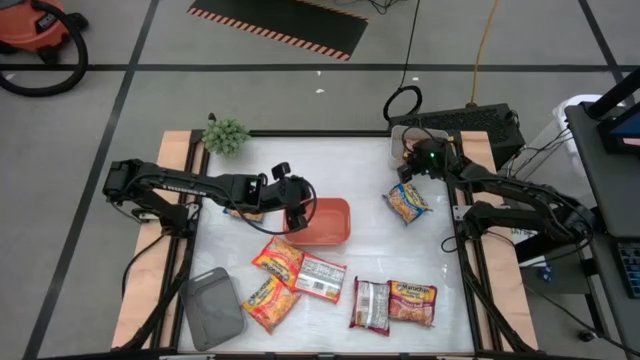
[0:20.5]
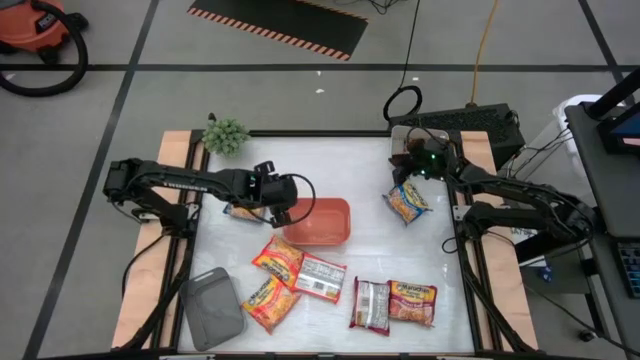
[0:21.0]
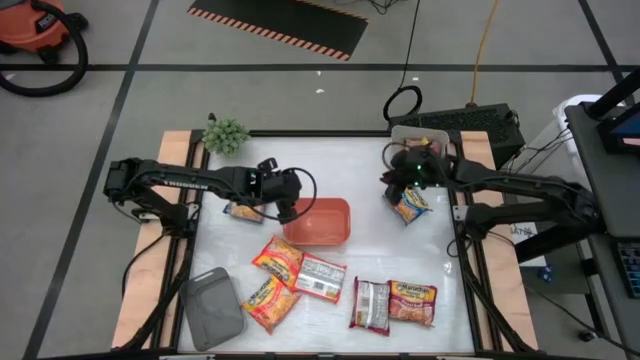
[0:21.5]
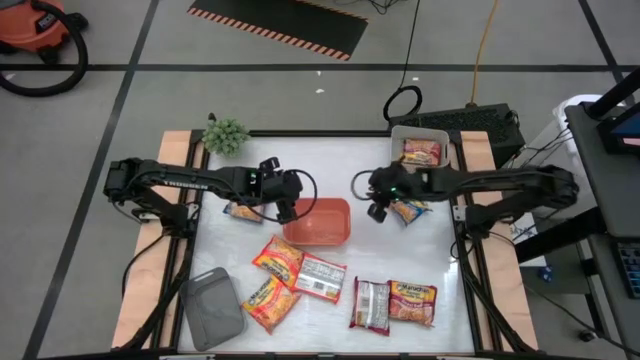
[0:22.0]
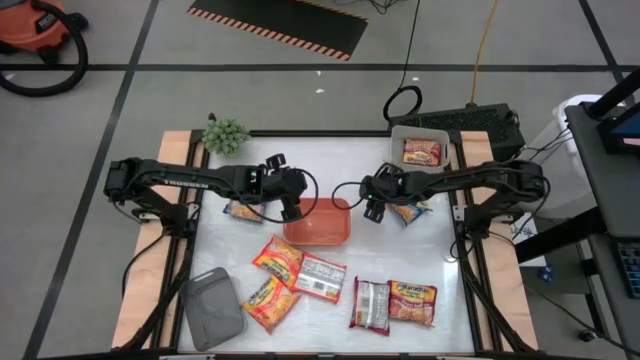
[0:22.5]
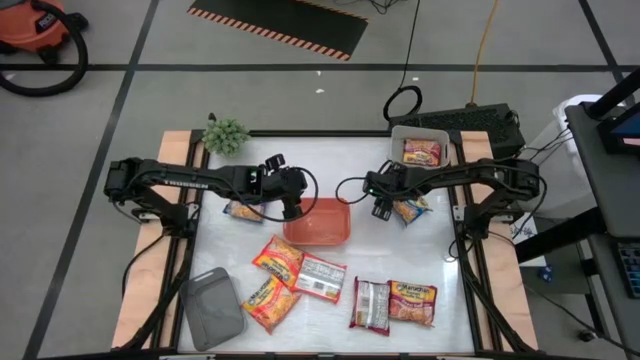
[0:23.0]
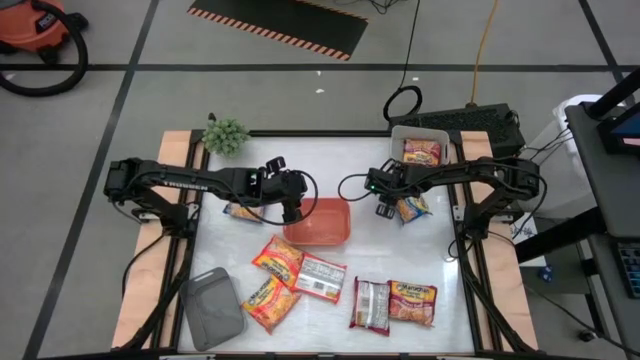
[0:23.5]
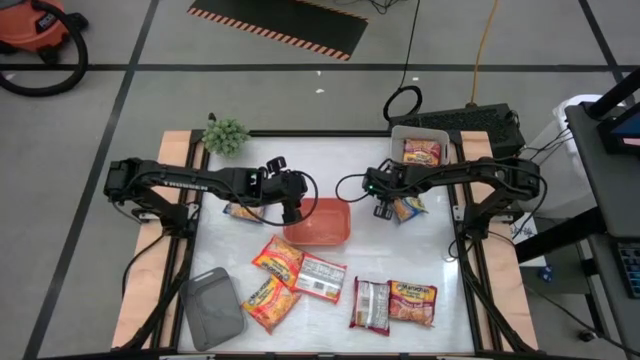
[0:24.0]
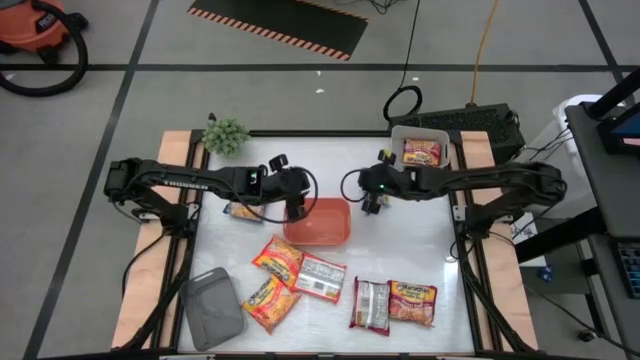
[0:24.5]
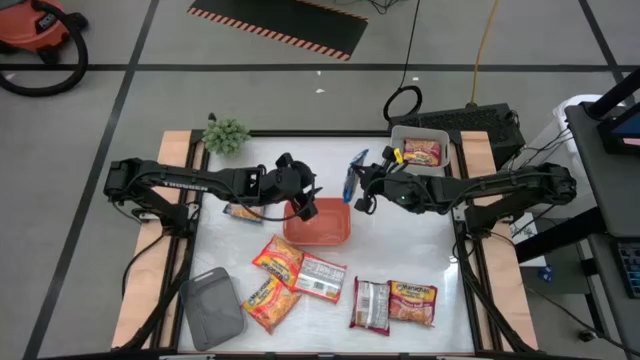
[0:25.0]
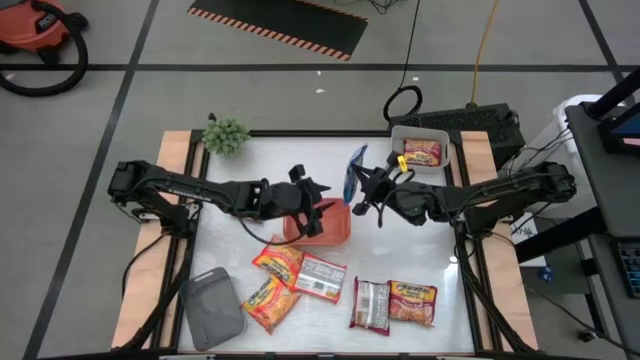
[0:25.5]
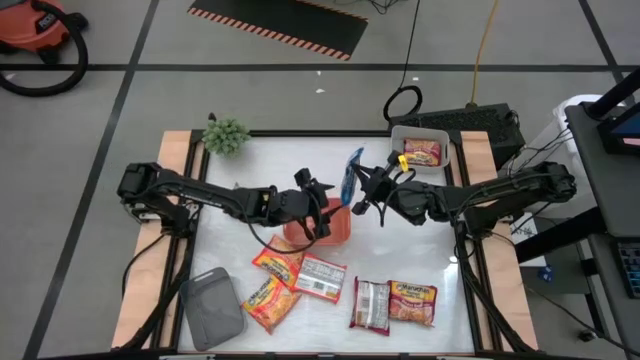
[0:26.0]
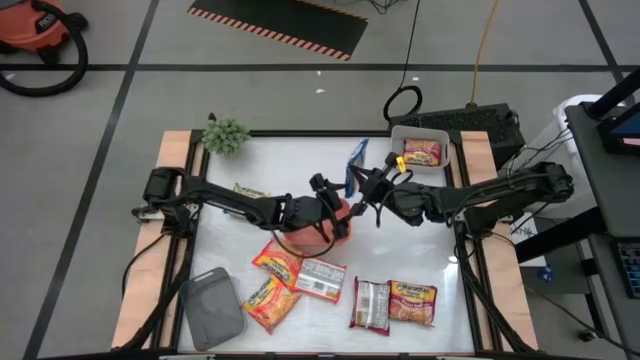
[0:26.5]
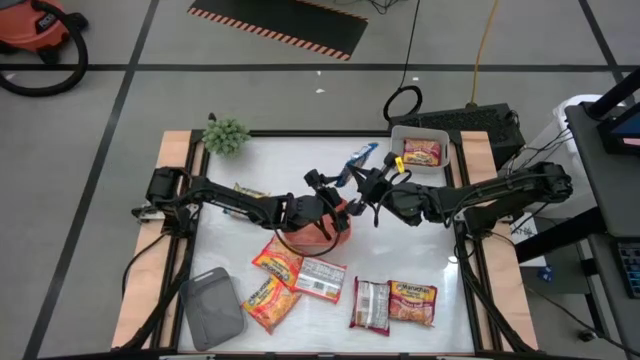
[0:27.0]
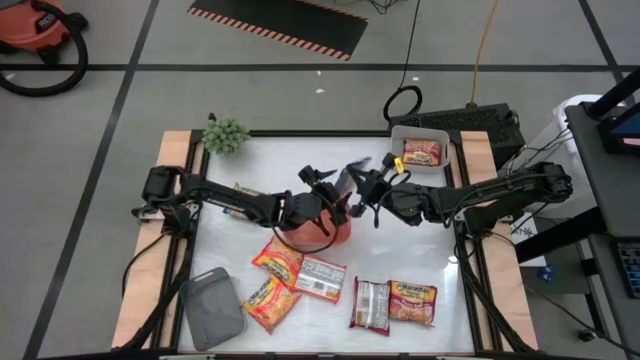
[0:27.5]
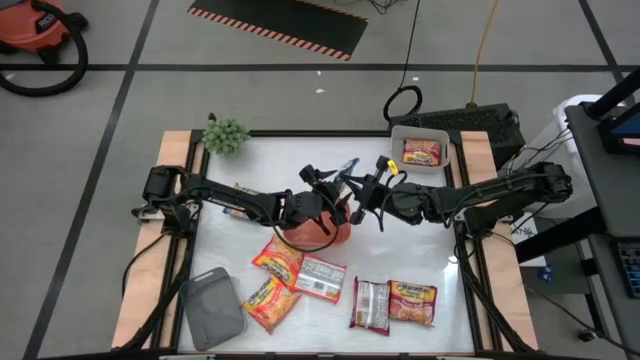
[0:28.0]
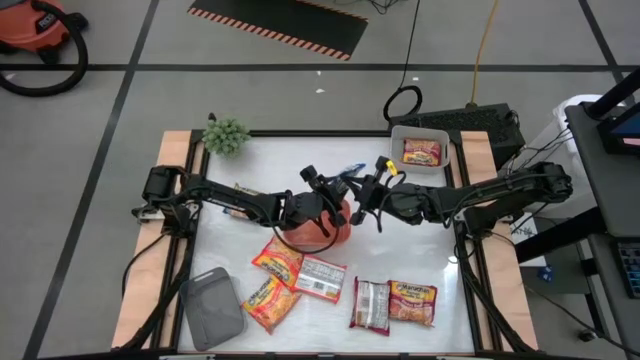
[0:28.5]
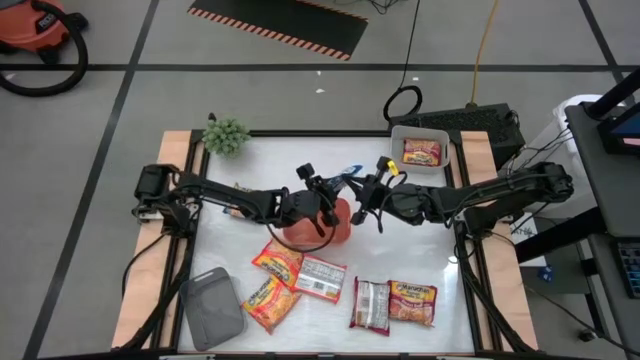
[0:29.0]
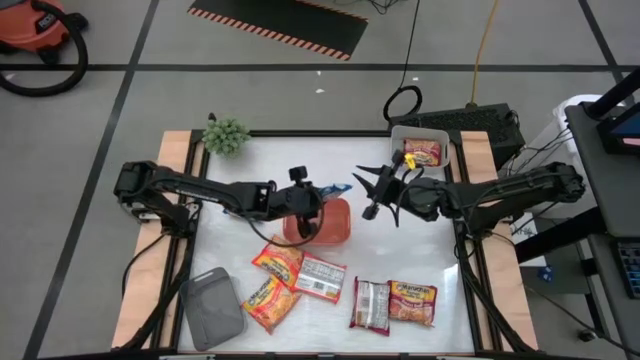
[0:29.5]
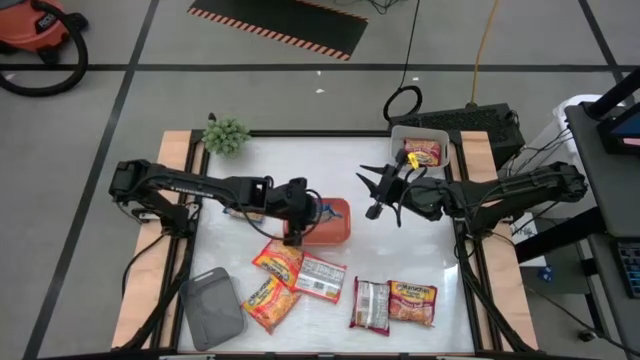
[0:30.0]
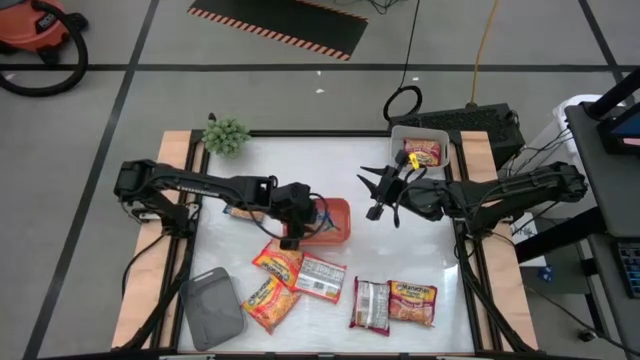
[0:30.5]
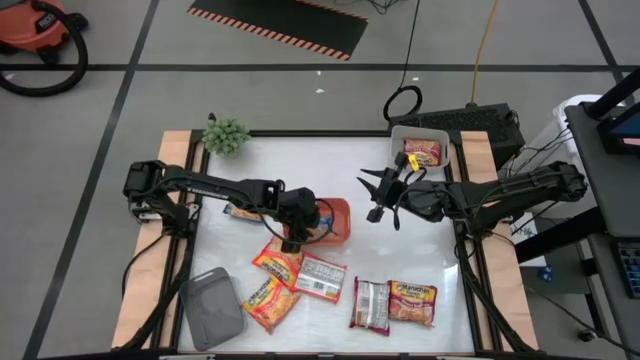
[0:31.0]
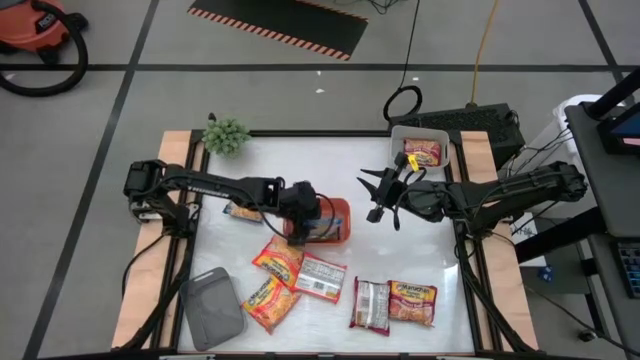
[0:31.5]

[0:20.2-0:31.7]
Task: Sort Maruchan noodles
Put the right blue noodle pack into the orange bin

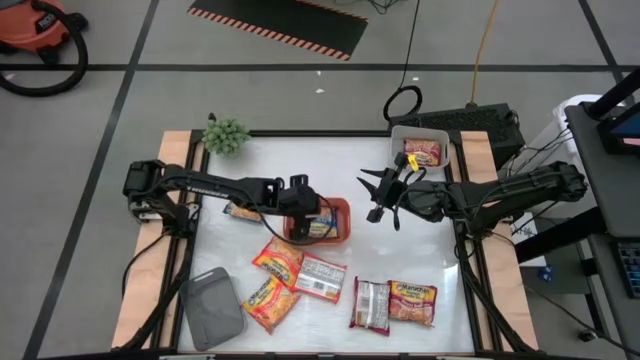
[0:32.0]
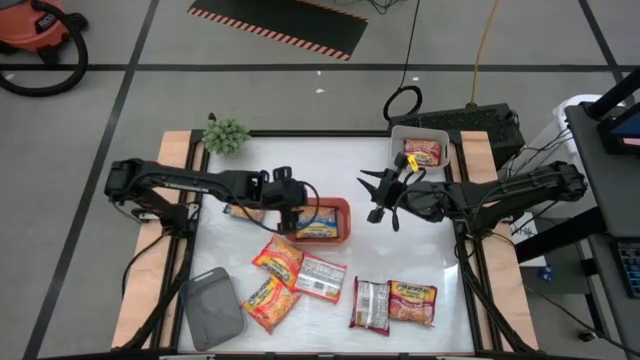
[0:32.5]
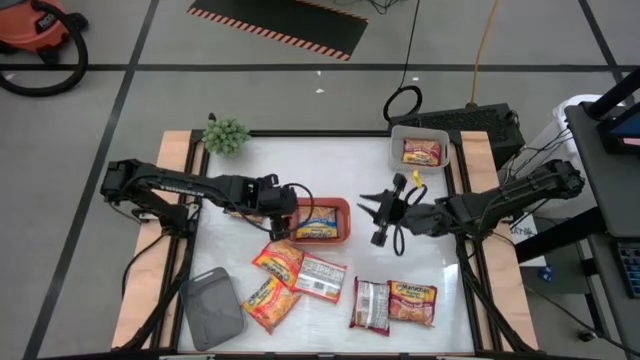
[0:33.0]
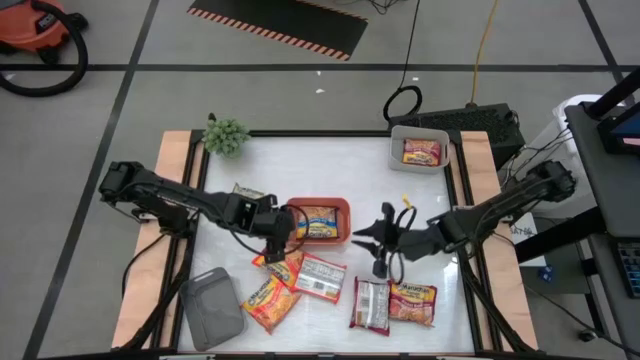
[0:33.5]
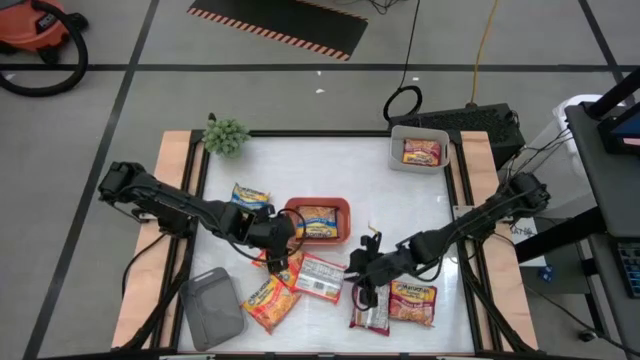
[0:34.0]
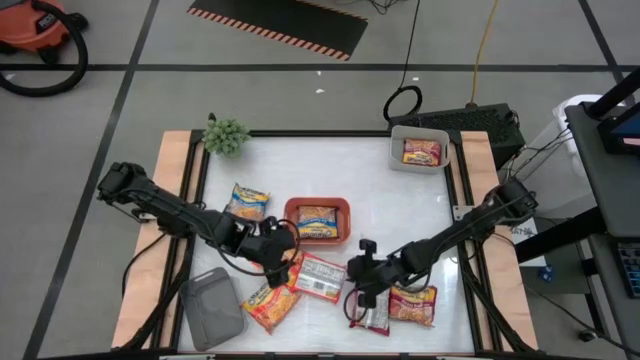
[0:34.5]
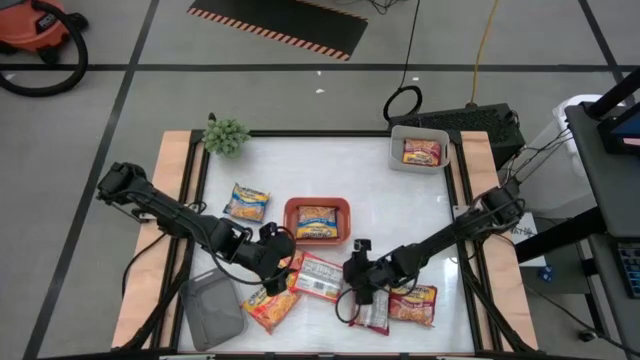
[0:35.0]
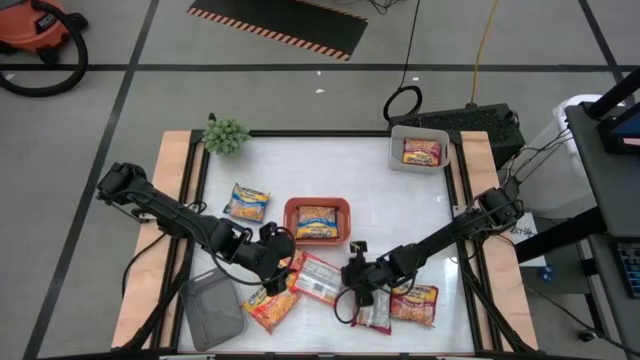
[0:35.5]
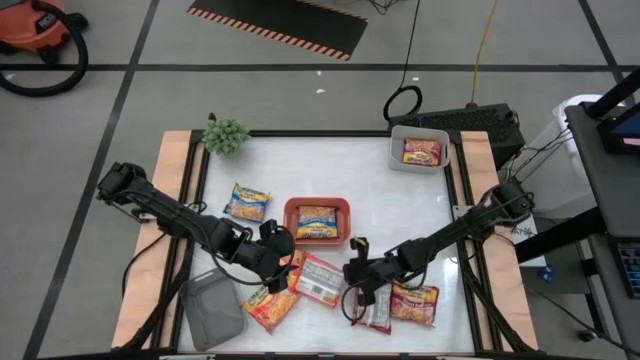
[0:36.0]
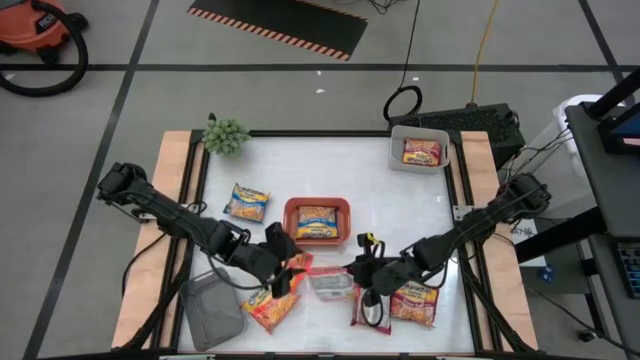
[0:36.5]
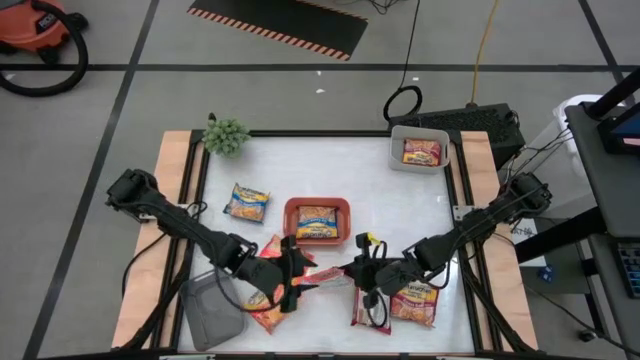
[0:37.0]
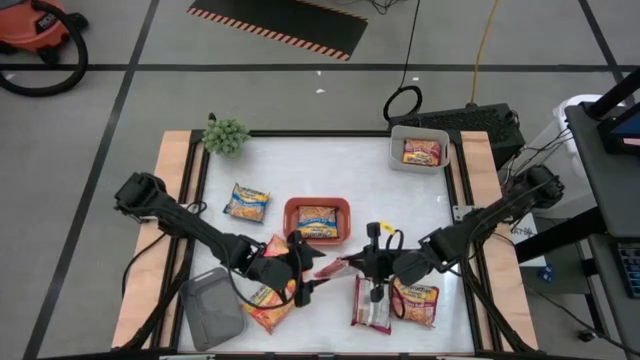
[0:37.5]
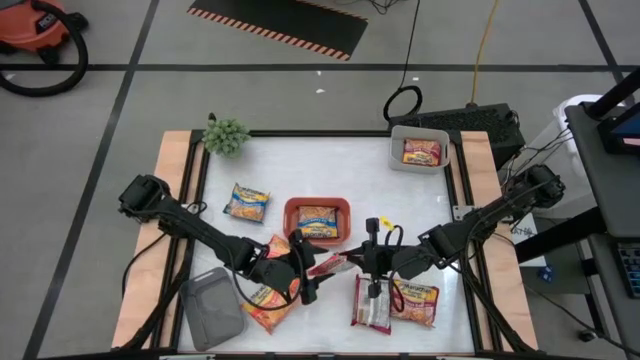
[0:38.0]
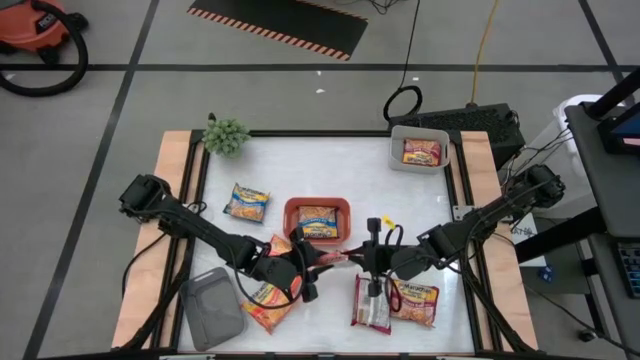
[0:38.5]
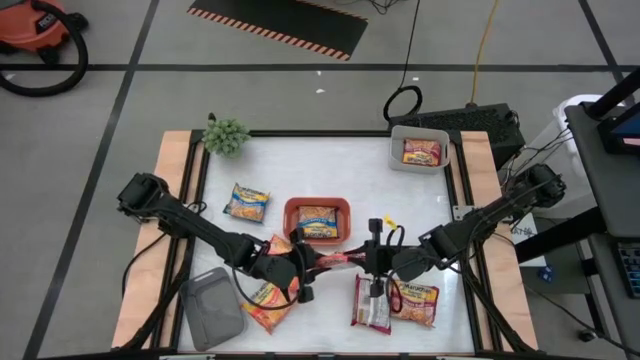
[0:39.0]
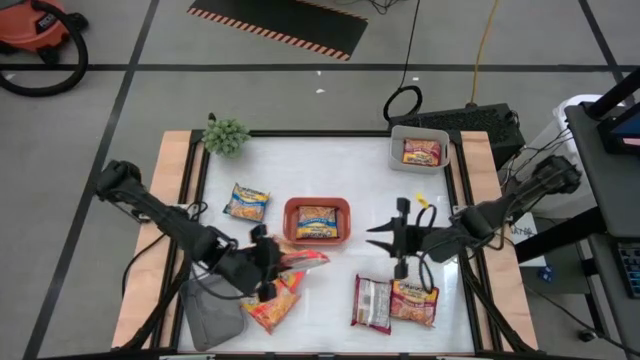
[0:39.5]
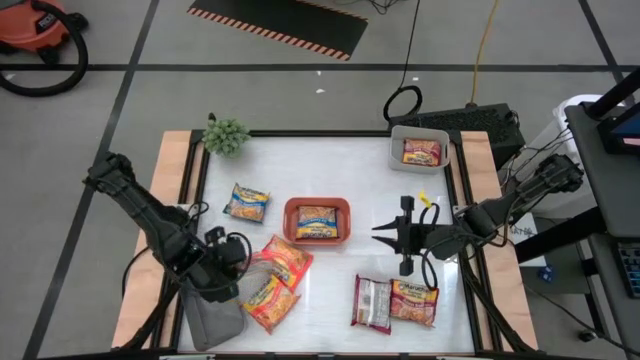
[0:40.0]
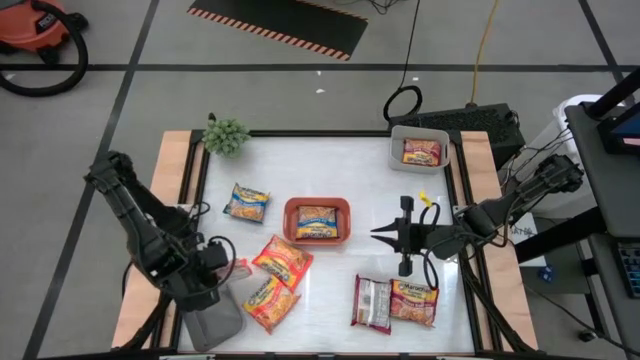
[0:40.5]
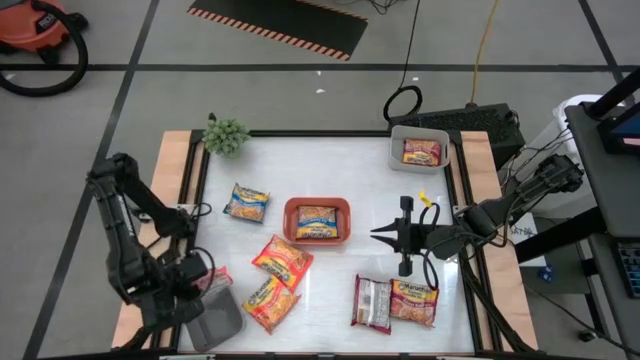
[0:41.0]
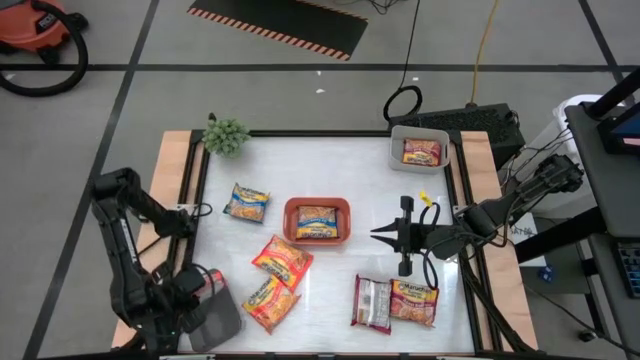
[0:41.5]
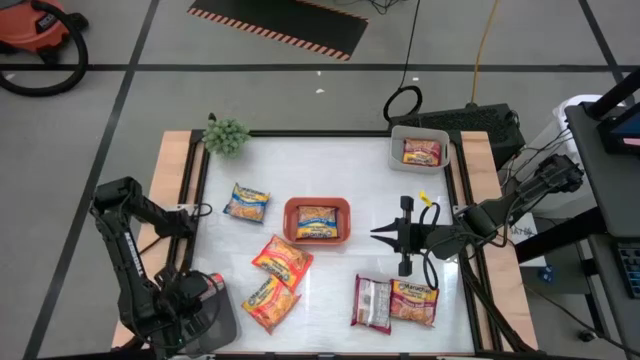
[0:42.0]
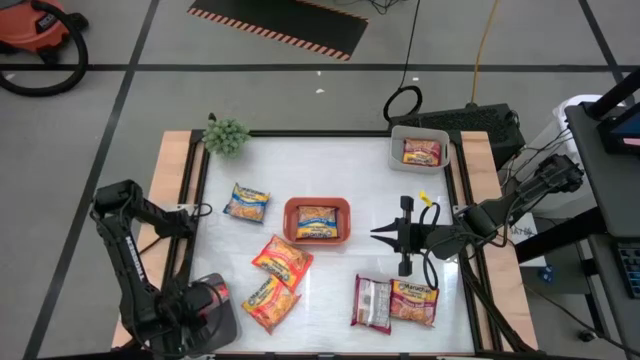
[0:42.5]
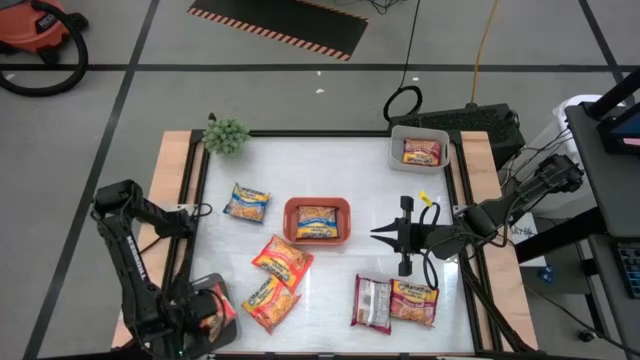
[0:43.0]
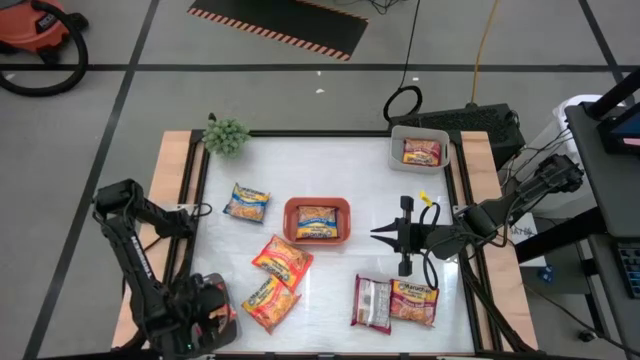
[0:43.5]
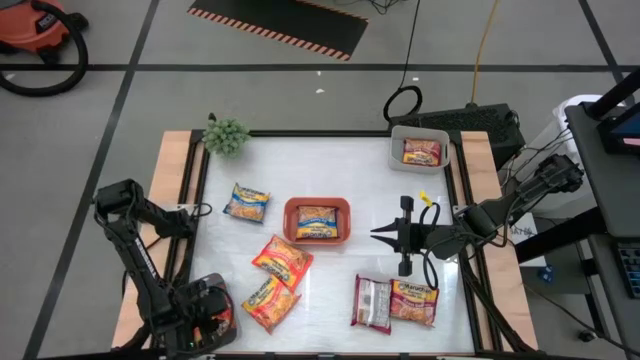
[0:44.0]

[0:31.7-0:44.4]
Put the top right orange noodle pack into the black bin
